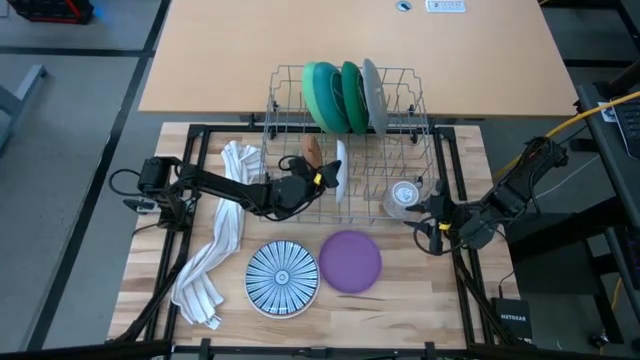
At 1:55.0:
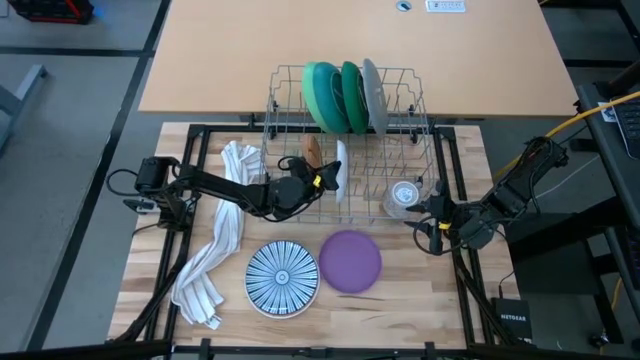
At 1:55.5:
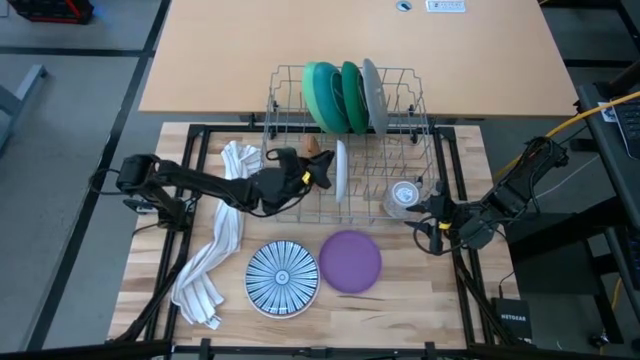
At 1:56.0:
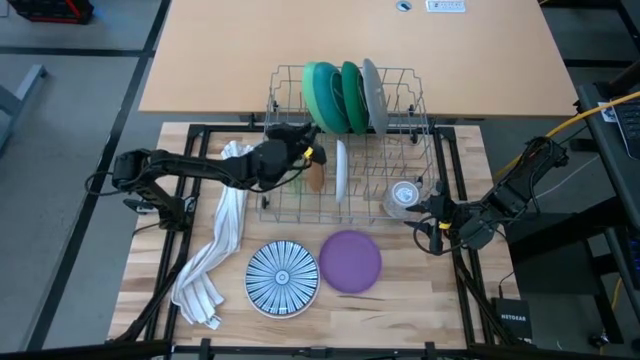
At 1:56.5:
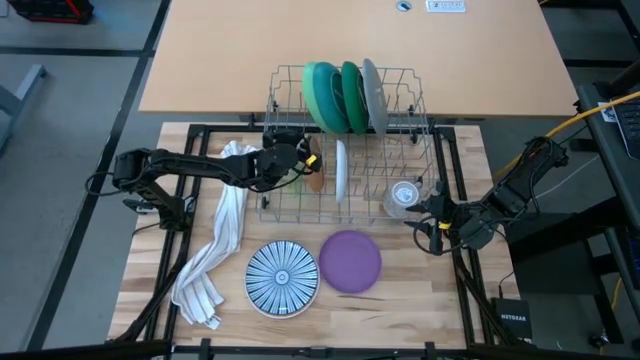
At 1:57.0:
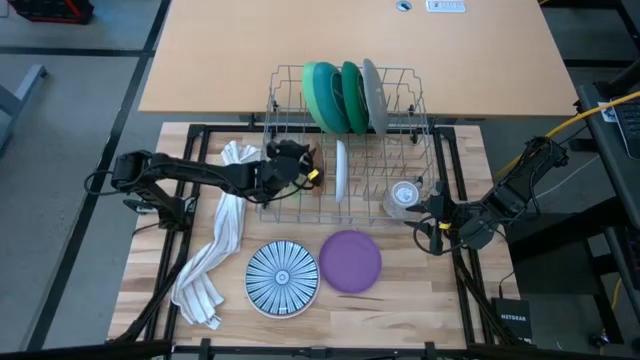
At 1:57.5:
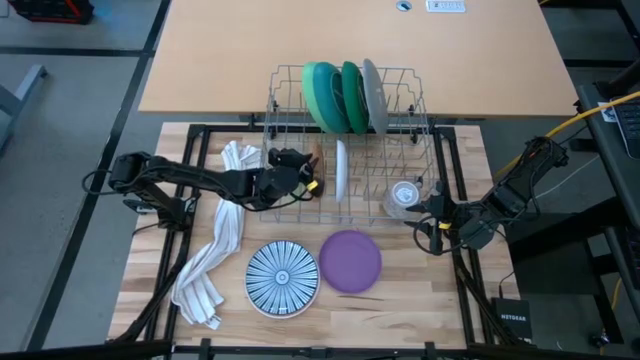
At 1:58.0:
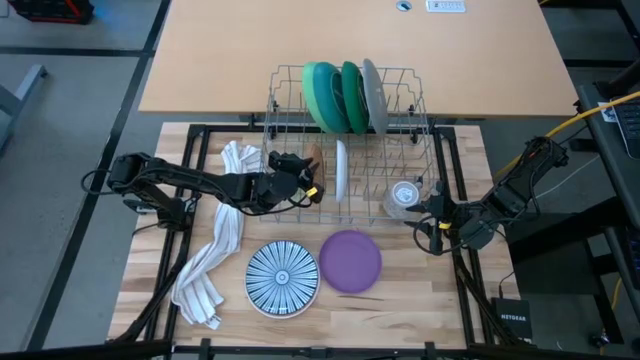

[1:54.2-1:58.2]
Task: Sort dishes
Adjust the brown plate on the dish rack

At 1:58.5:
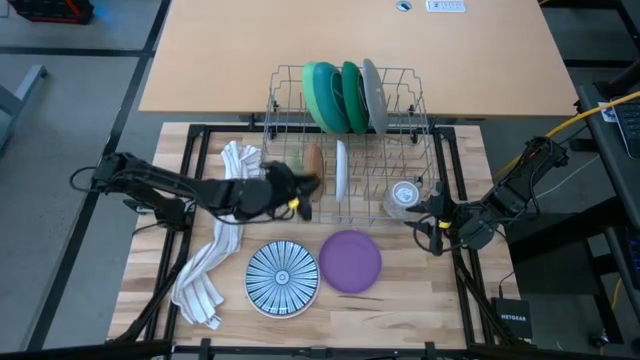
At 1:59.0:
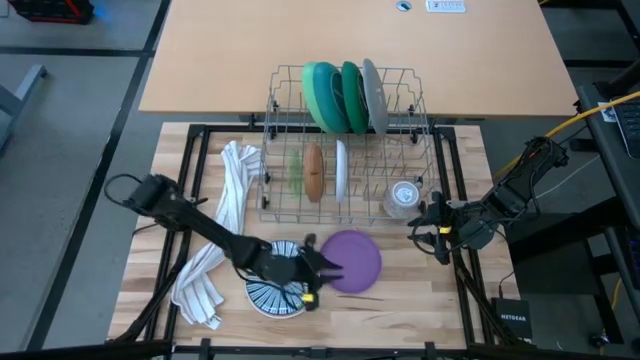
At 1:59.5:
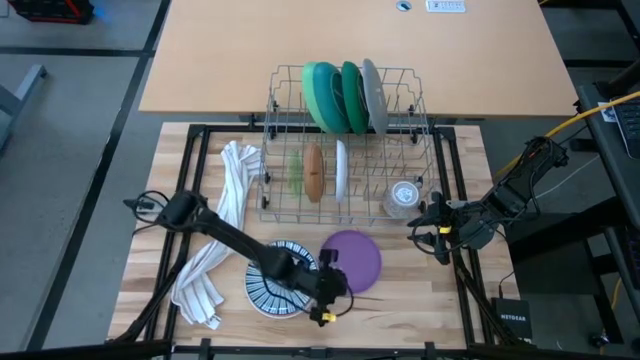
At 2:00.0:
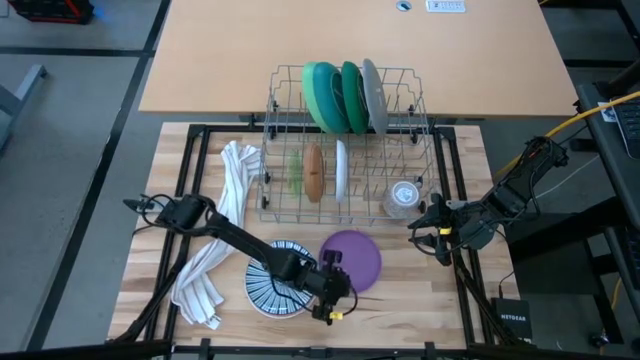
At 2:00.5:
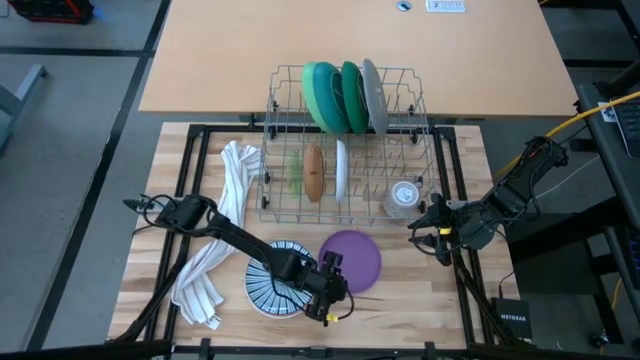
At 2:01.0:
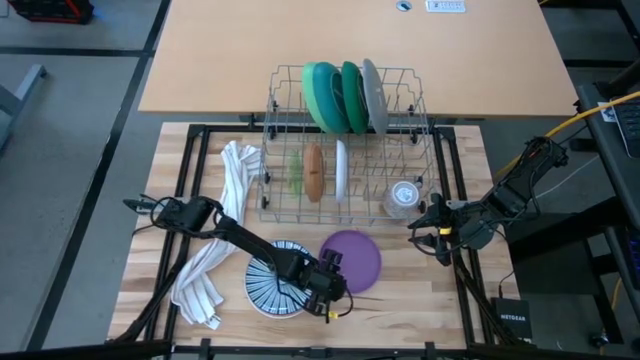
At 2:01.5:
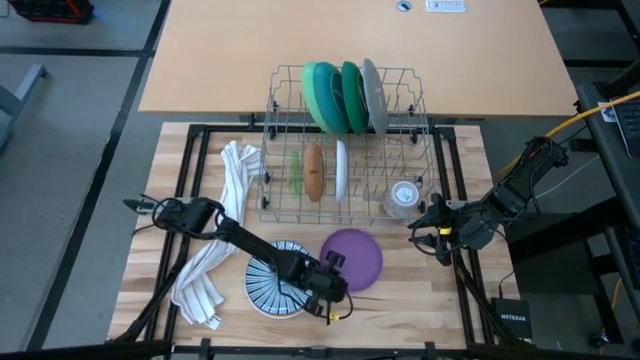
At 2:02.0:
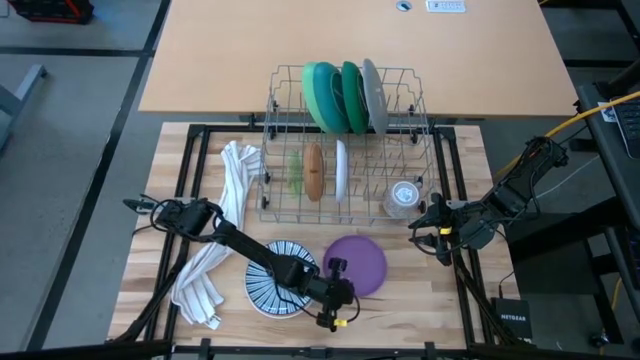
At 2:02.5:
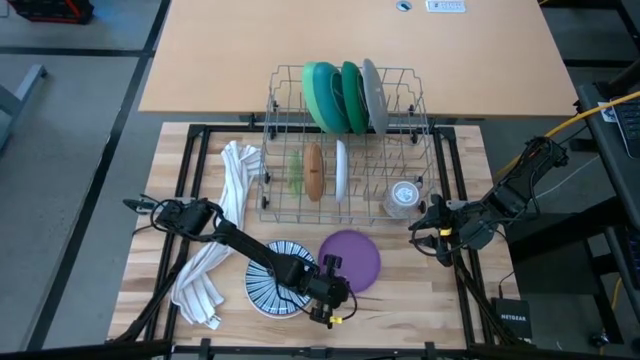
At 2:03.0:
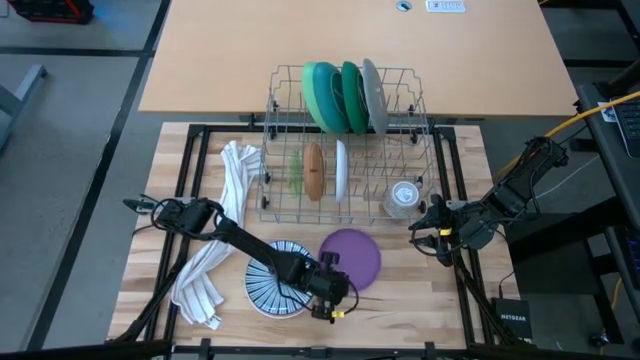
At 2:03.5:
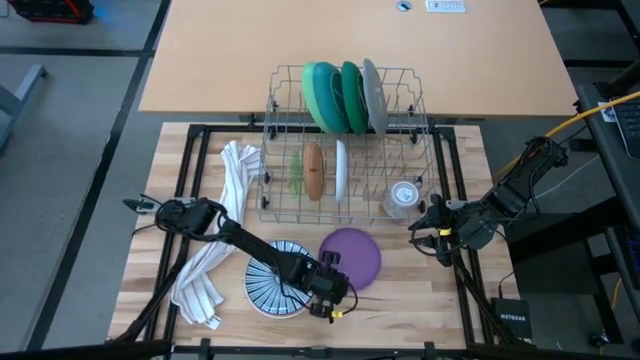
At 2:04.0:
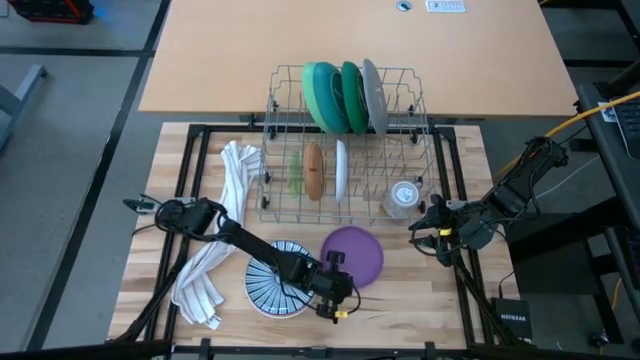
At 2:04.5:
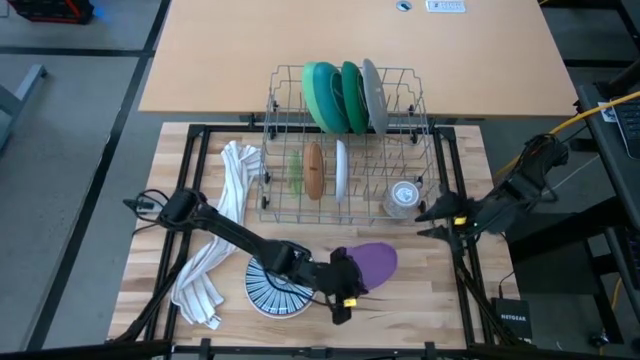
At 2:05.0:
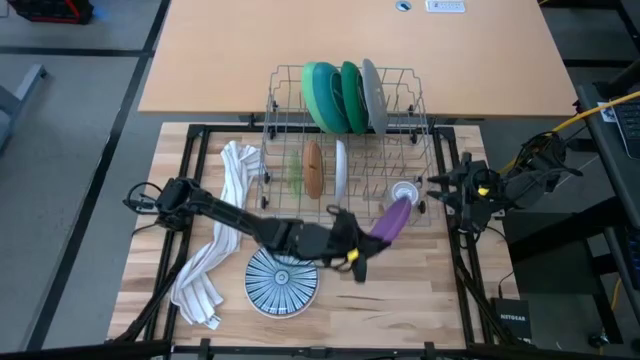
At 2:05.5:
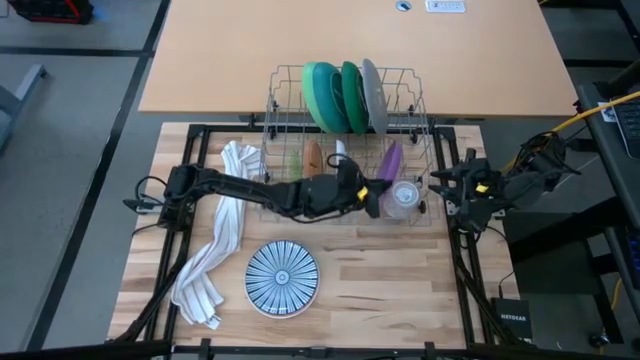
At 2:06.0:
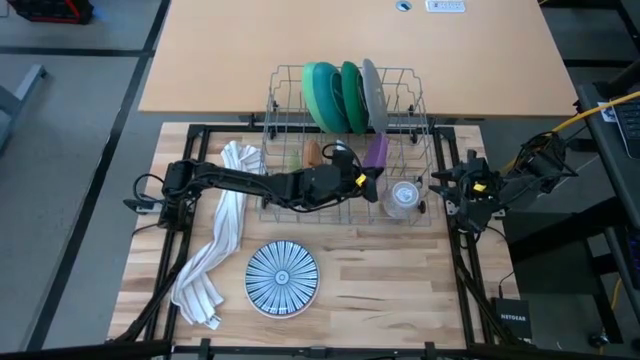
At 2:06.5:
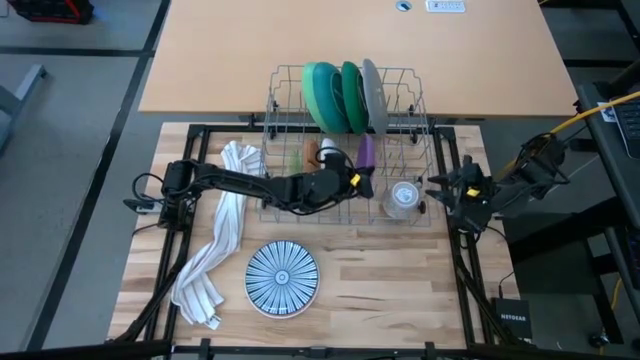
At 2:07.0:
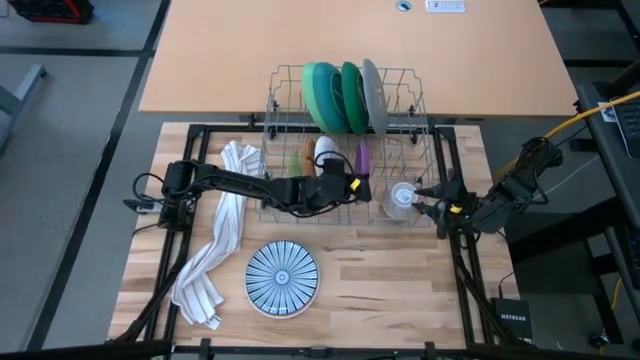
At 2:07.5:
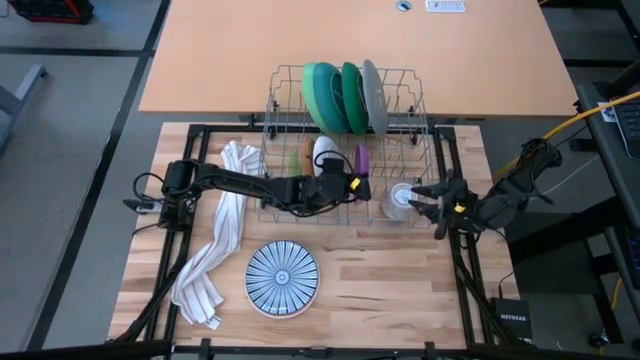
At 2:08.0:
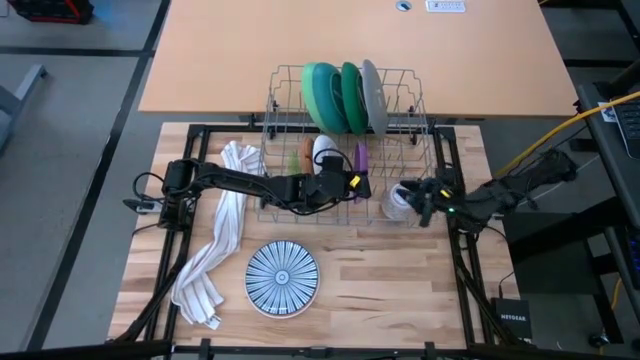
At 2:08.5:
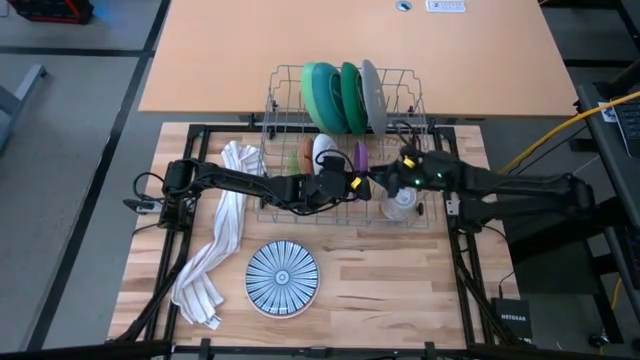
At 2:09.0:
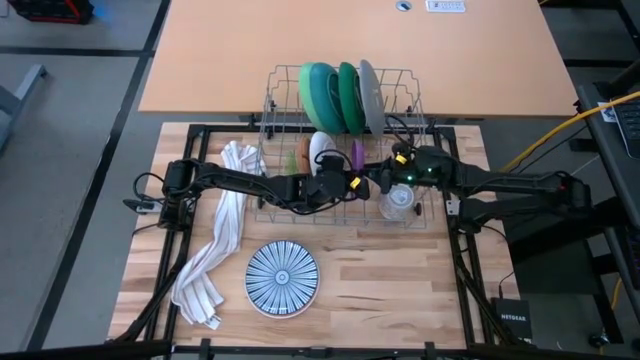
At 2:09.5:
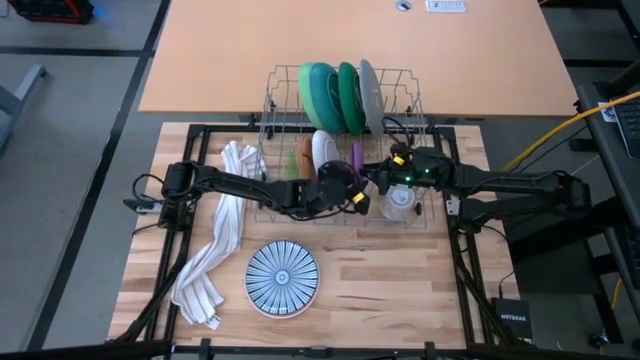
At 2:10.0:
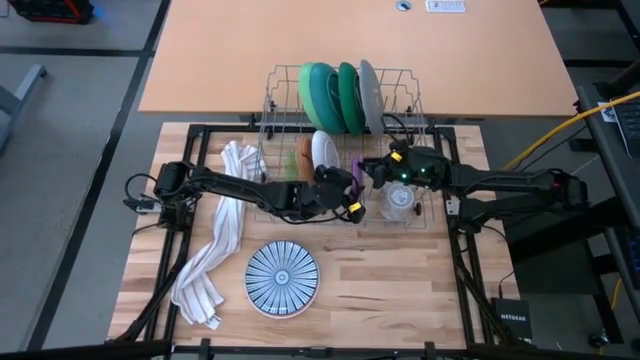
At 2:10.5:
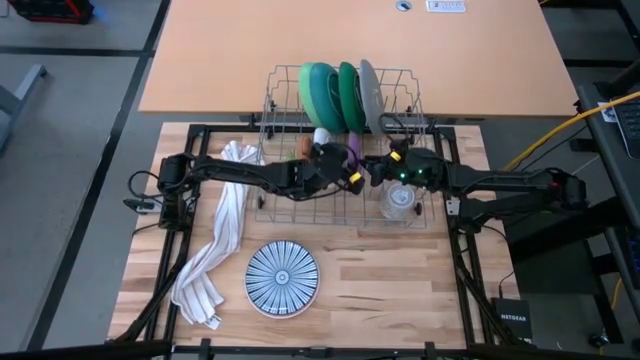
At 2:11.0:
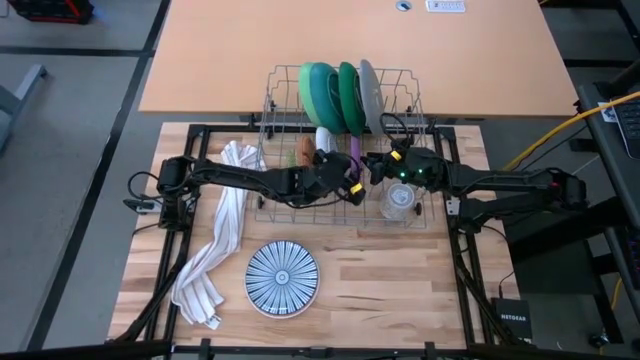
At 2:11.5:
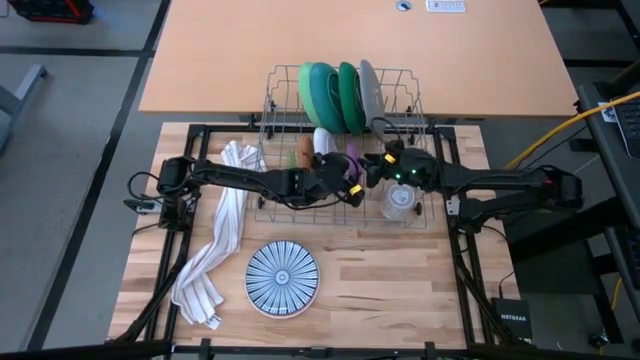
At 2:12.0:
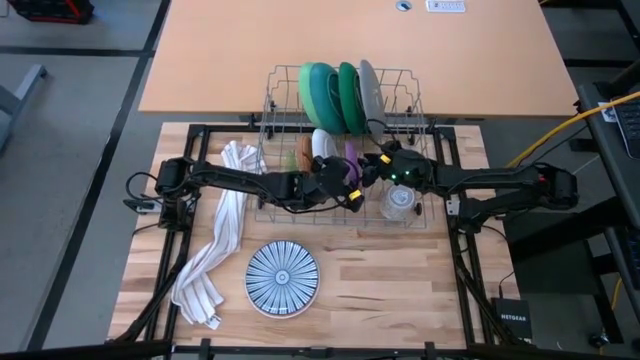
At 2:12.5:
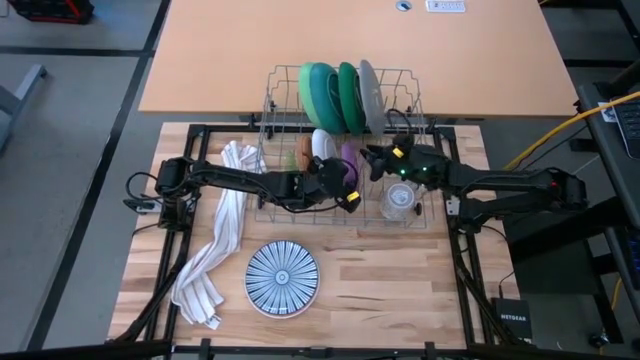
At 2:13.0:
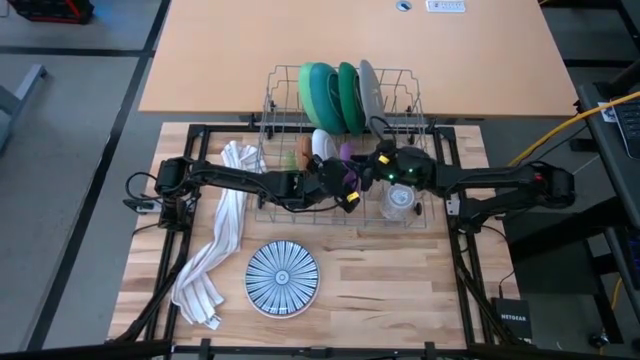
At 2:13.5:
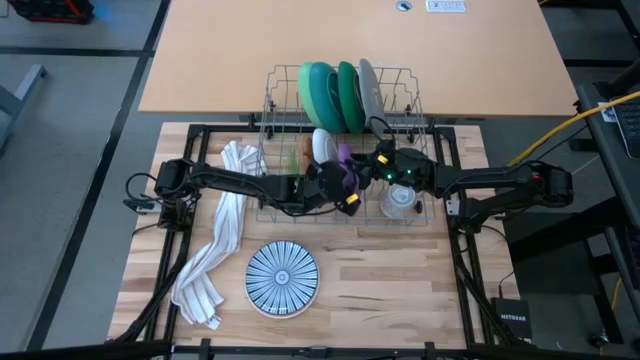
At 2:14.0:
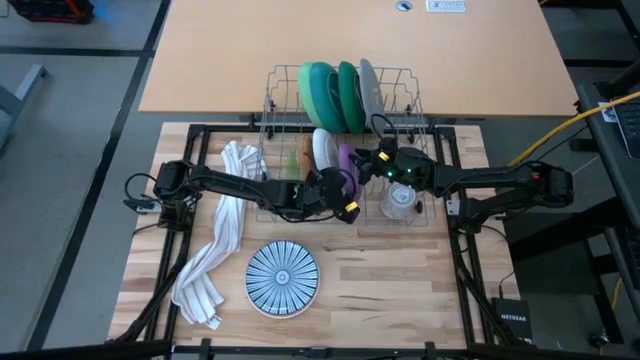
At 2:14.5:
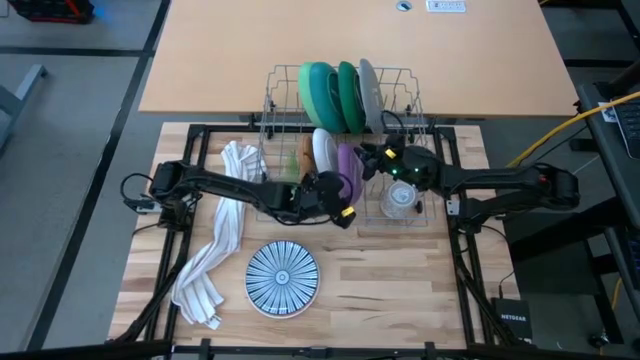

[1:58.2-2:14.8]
Put the violet plate into the dish rack

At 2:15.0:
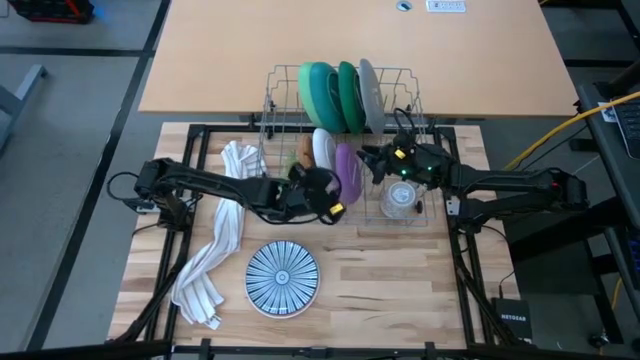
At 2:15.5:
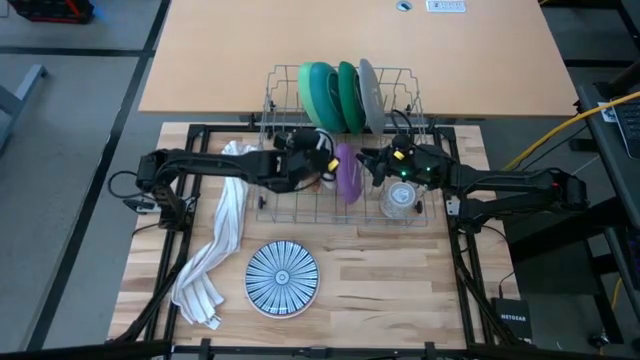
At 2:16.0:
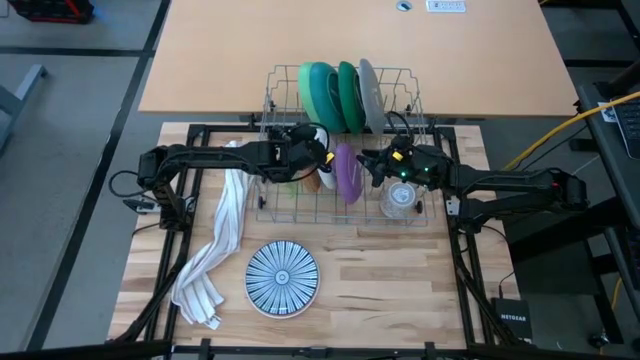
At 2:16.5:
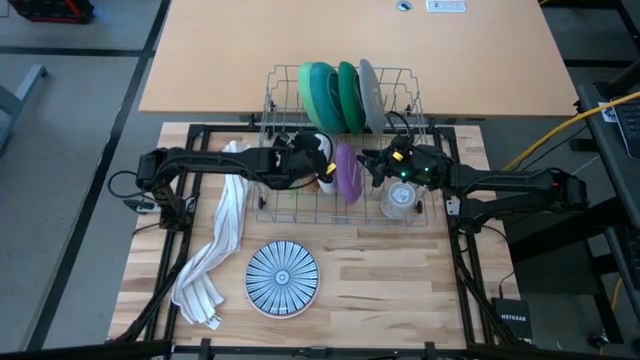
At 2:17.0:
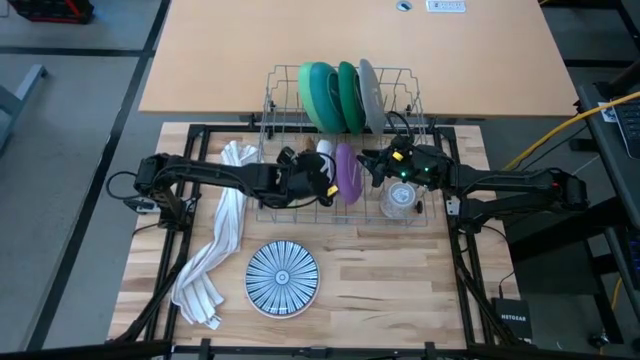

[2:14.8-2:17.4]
Adjust the white plate on the dish rack
